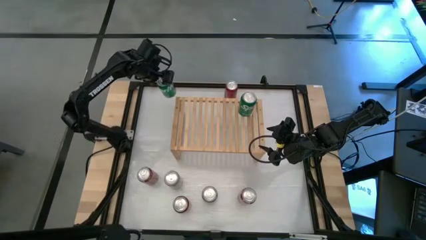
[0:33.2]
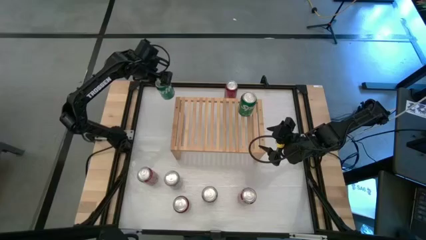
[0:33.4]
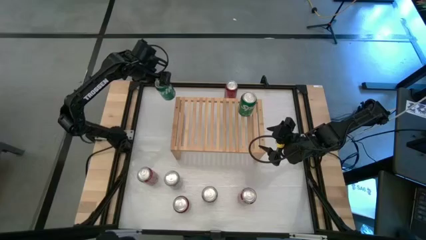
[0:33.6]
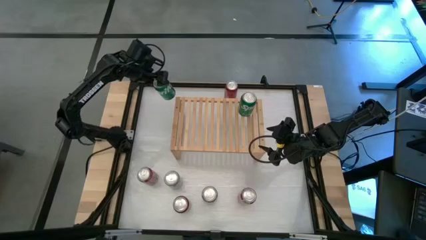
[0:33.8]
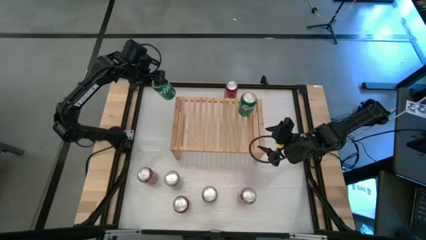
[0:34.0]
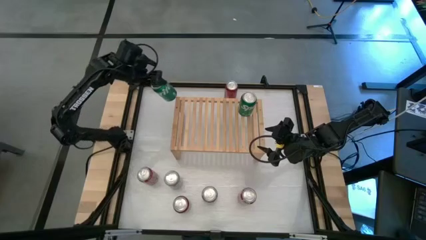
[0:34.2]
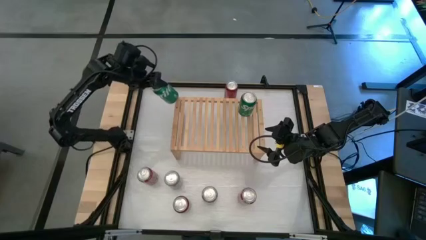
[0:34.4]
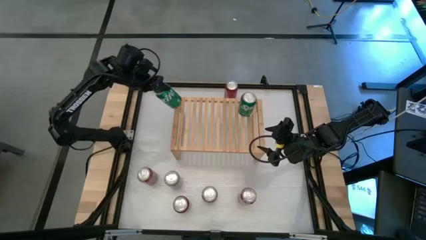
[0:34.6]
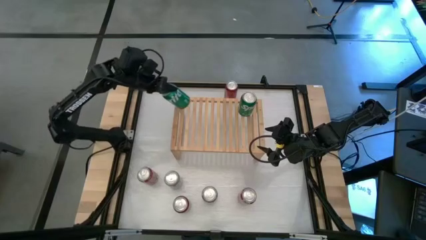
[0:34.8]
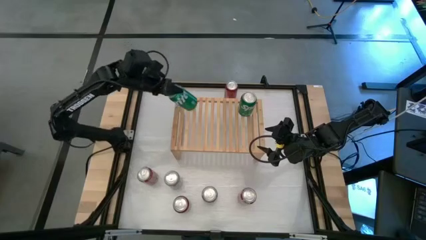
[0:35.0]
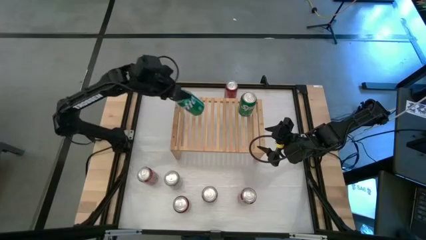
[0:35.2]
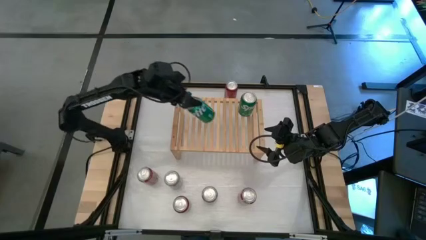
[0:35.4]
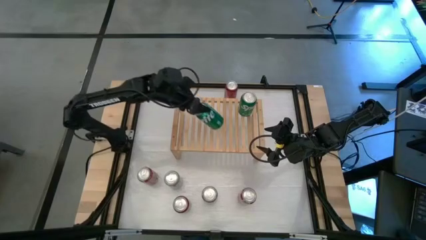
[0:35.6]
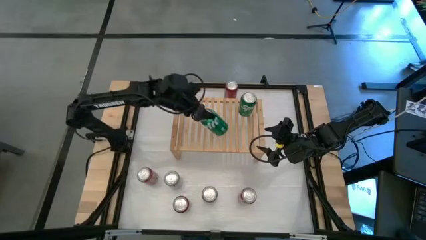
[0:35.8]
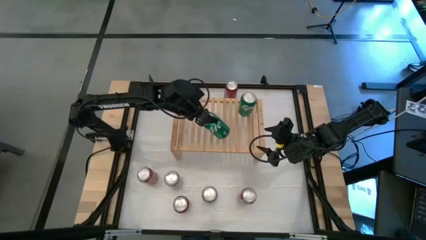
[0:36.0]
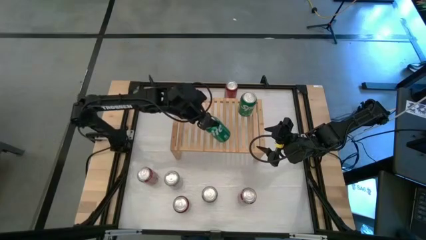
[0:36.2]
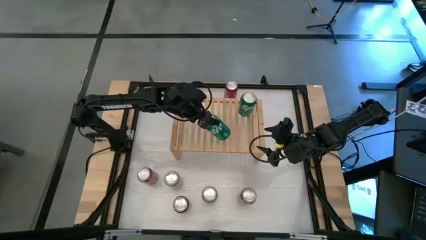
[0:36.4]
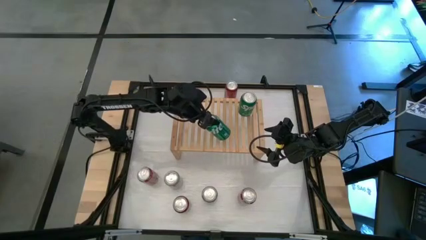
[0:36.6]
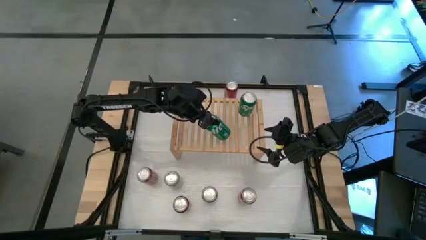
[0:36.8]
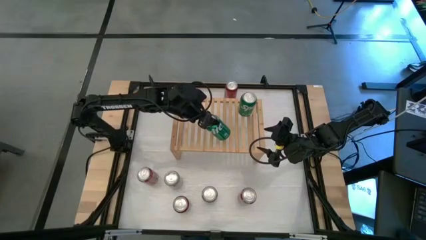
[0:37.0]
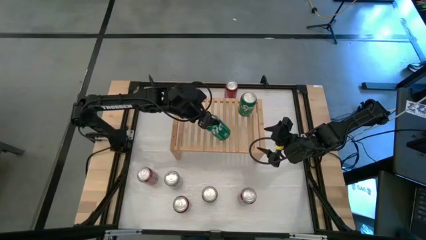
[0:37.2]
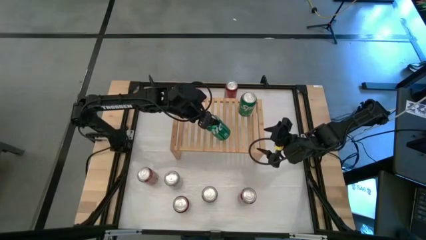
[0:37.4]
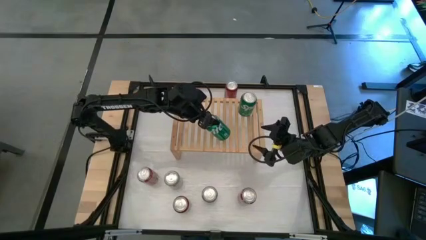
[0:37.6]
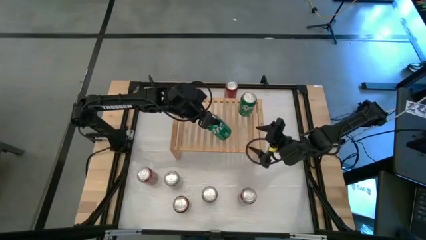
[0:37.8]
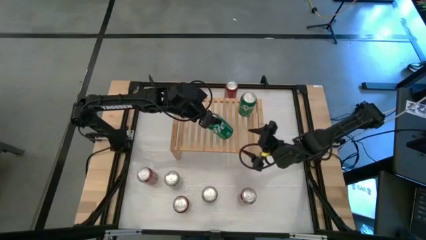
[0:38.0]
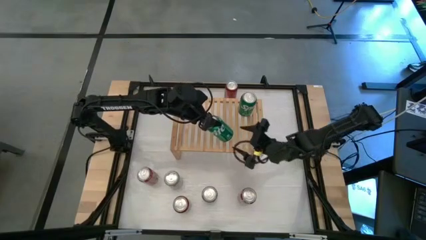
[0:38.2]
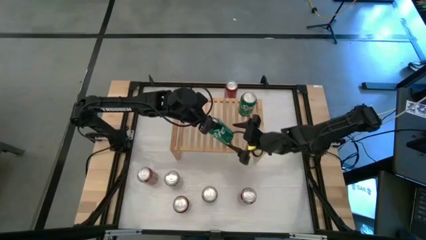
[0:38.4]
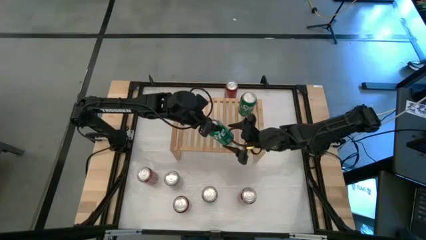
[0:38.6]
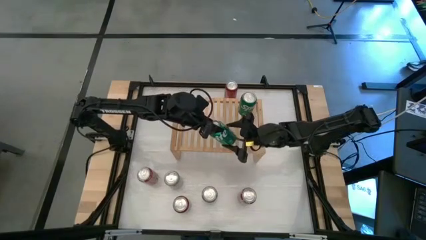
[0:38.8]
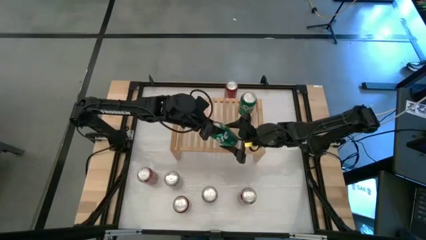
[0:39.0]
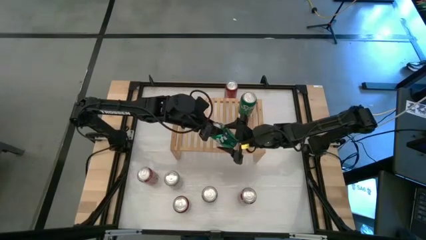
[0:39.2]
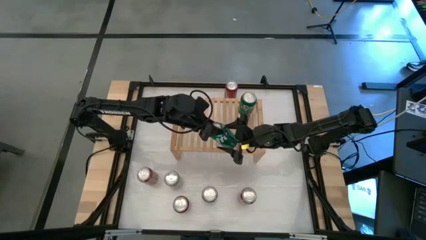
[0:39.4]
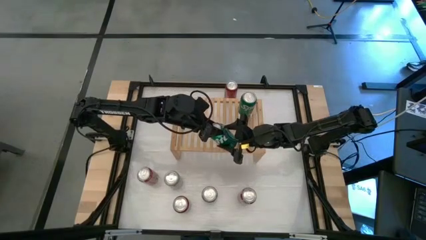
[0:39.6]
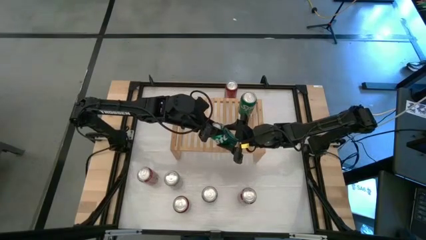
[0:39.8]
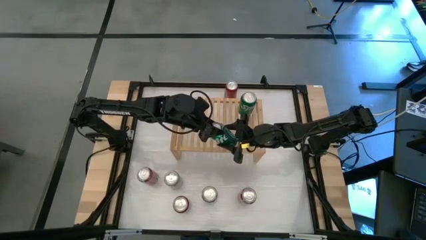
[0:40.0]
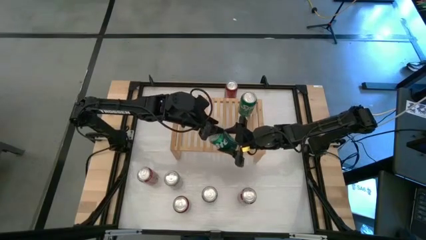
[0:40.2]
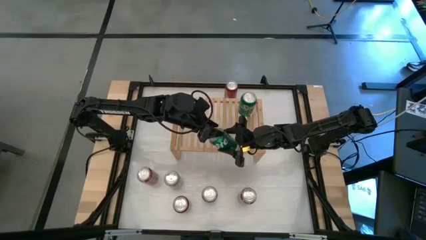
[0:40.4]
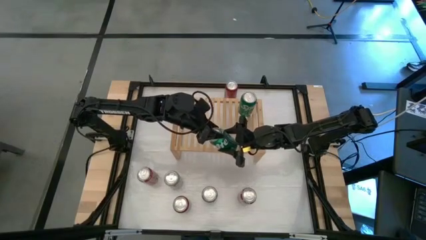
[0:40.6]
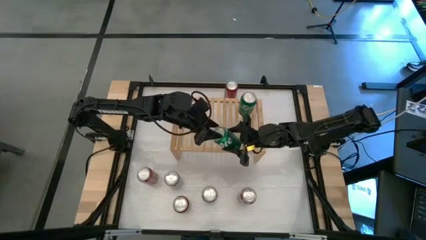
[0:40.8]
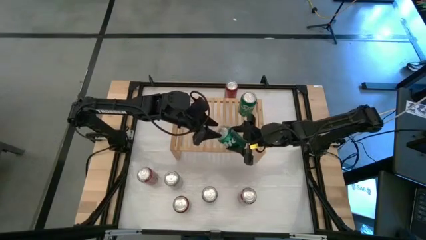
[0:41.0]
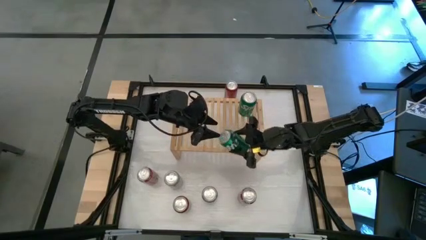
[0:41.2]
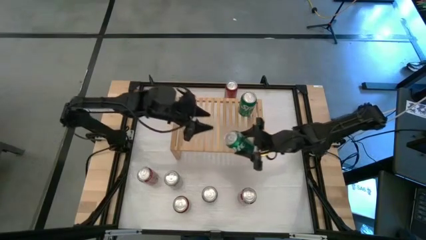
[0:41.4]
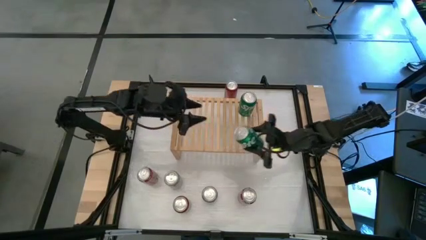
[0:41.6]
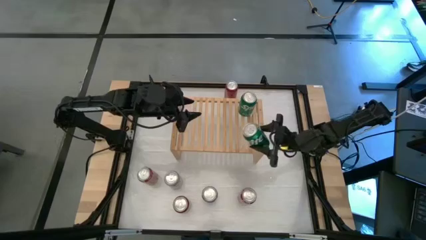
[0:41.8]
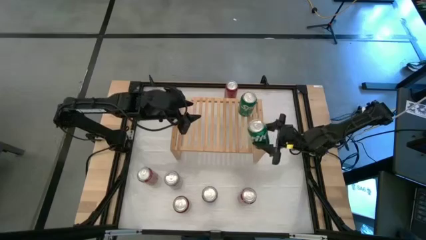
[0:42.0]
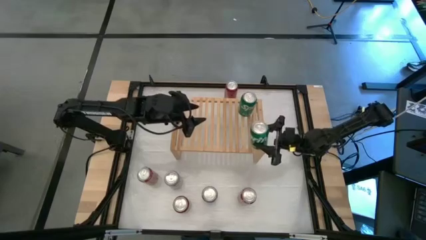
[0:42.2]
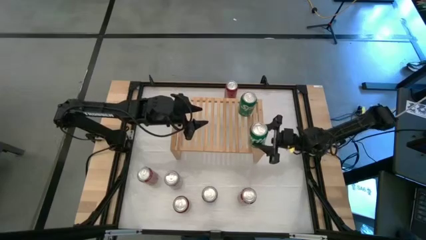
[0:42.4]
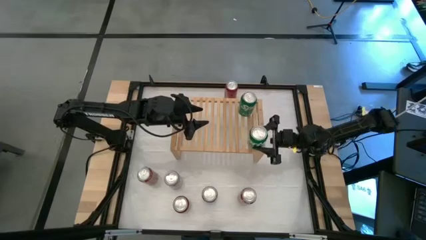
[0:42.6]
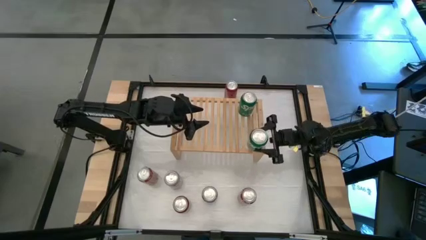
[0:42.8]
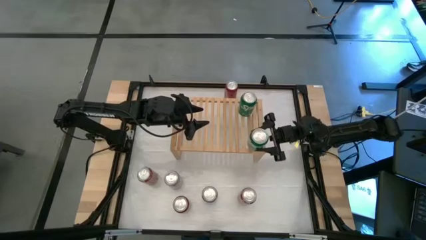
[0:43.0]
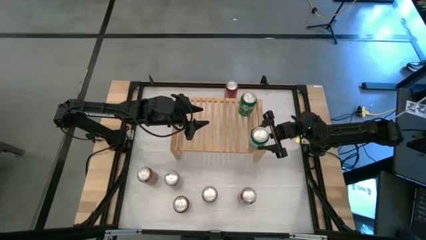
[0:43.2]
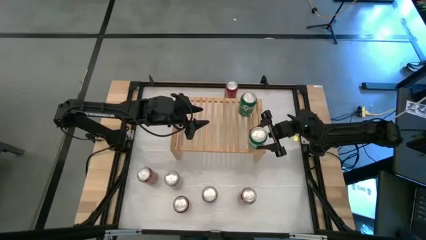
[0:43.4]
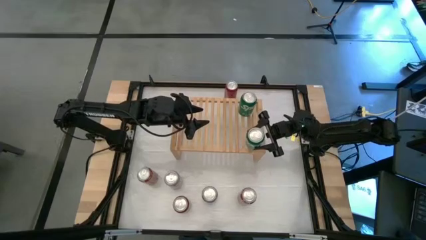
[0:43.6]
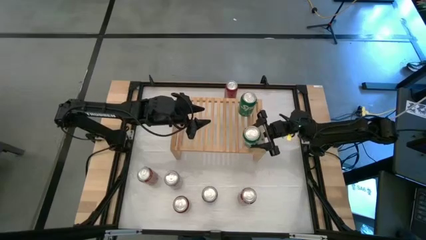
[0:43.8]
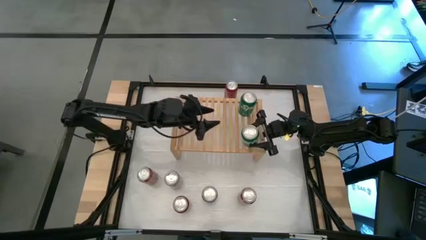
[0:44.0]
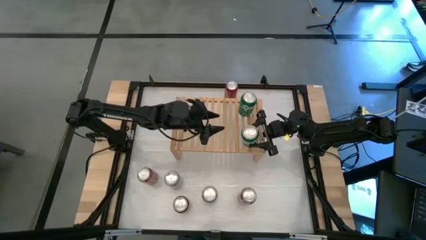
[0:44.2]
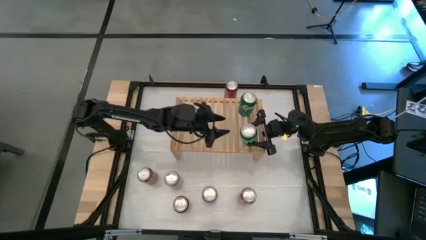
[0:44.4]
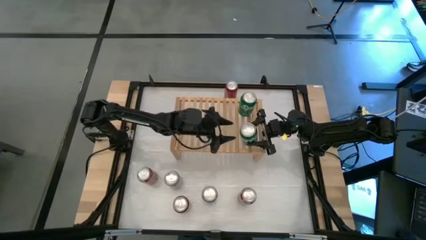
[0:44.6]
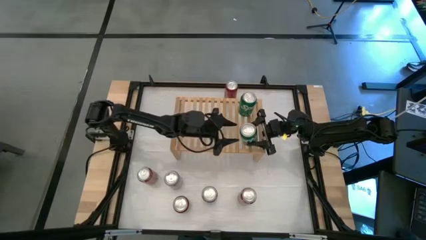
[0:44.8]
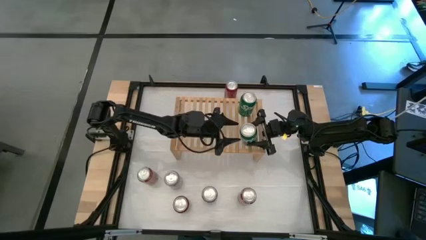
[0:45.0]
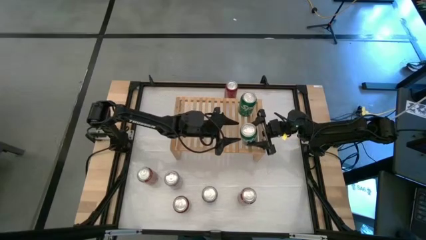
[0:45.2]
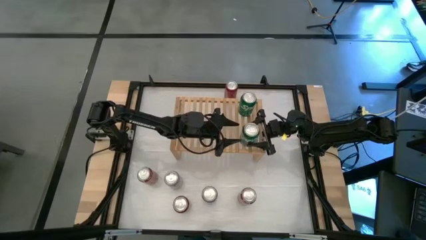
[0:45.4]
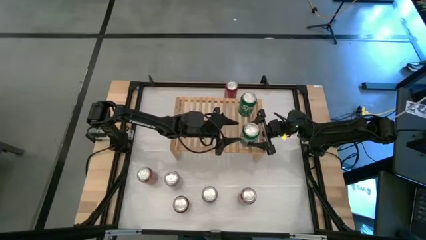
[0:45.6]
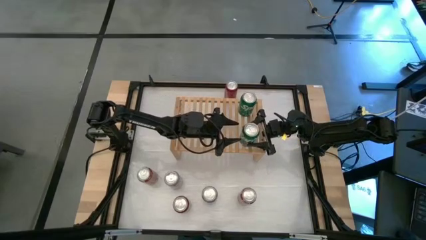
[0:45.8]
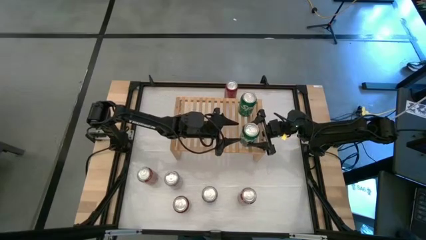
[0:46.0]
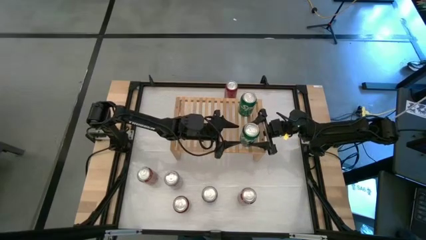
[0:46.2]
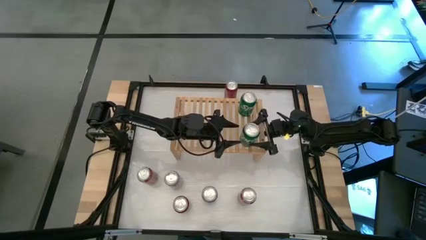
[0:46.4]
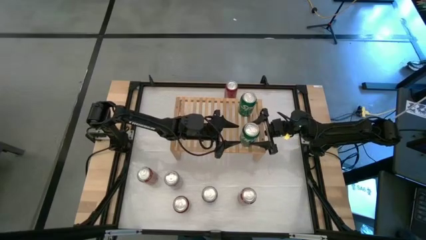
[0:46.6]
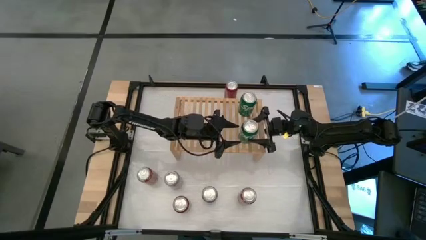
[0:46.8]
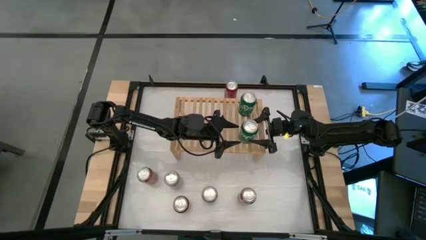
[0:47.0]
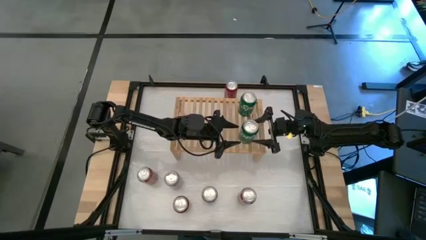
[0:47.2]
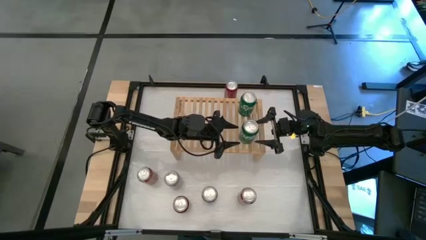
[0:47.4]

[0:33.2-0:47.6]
Task: Place canned beverage on shelf
Put the green soda can on the shelf aligned with the other green soda can
